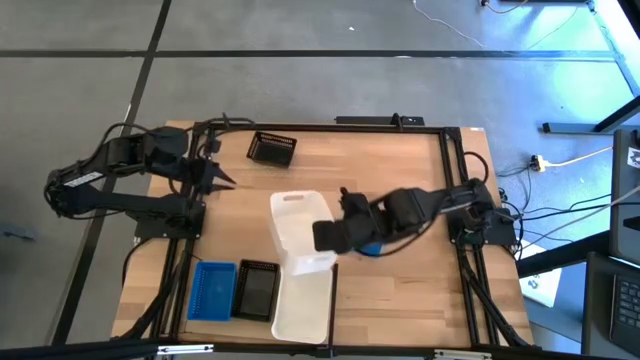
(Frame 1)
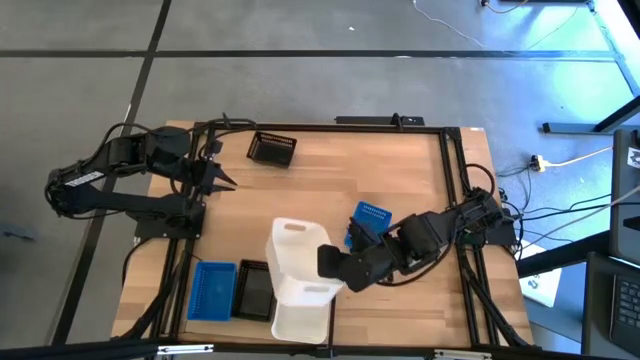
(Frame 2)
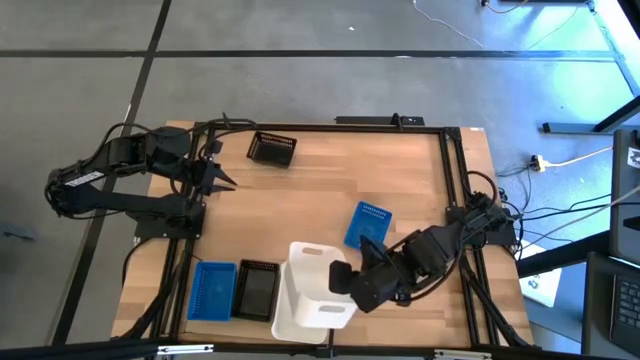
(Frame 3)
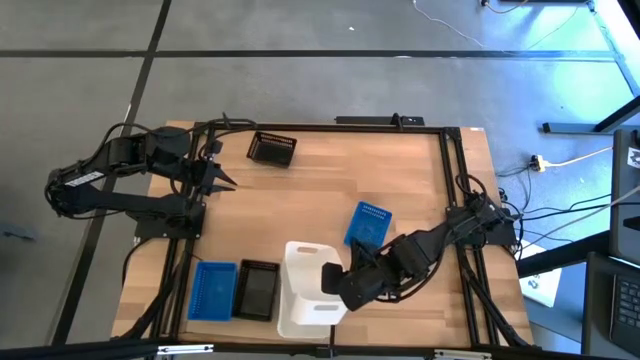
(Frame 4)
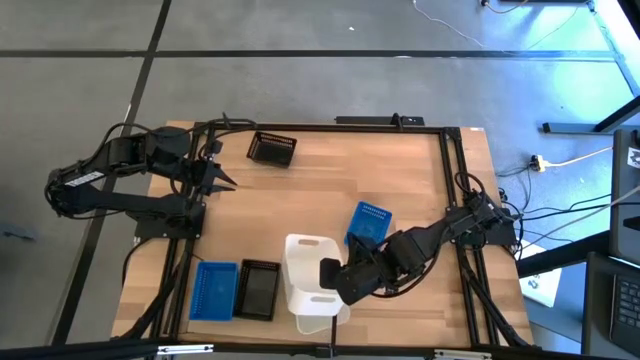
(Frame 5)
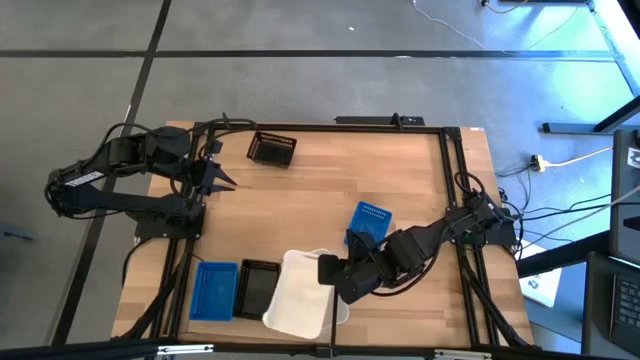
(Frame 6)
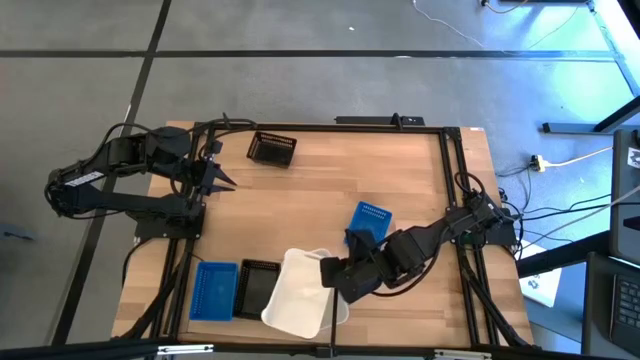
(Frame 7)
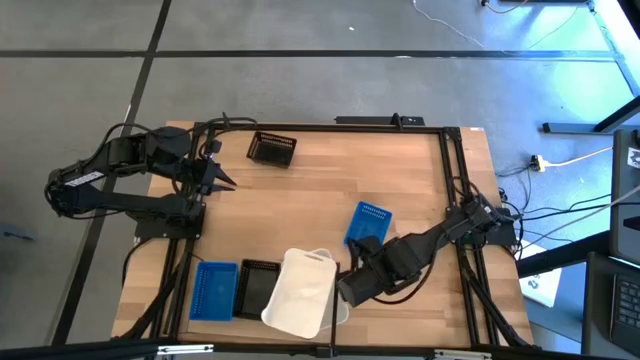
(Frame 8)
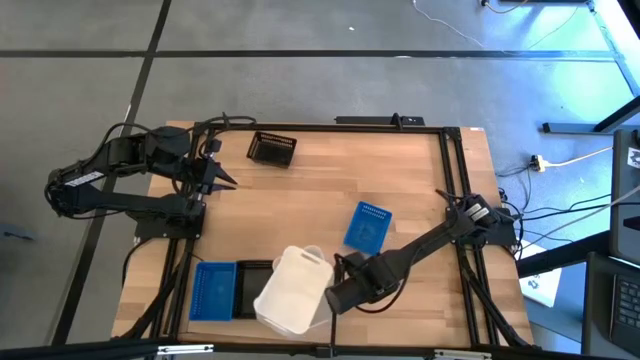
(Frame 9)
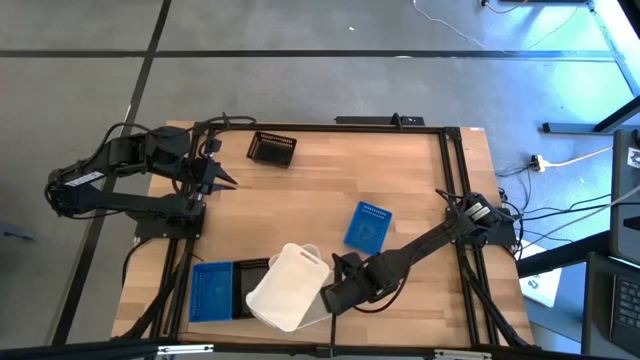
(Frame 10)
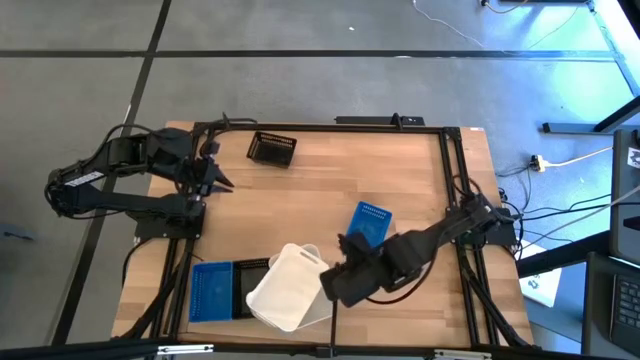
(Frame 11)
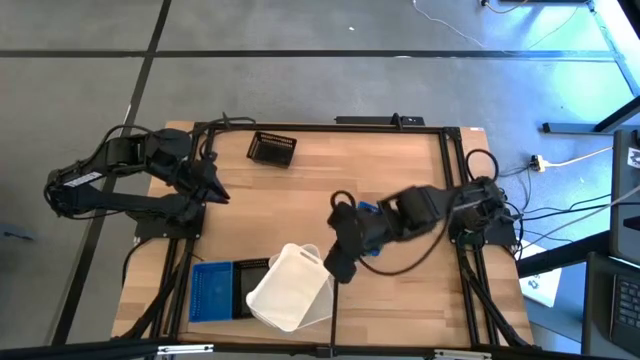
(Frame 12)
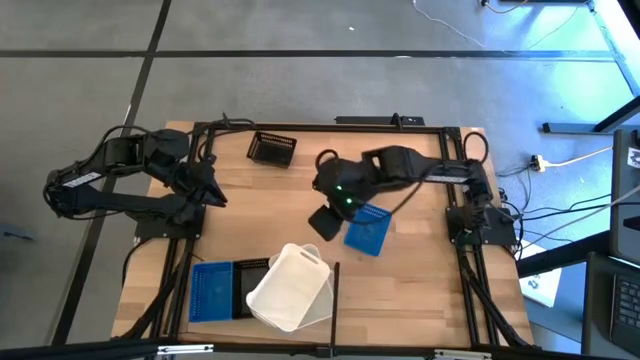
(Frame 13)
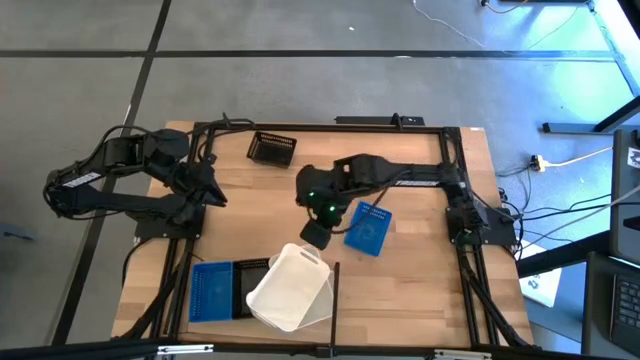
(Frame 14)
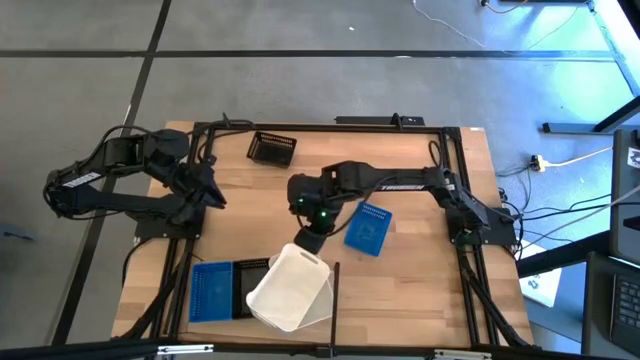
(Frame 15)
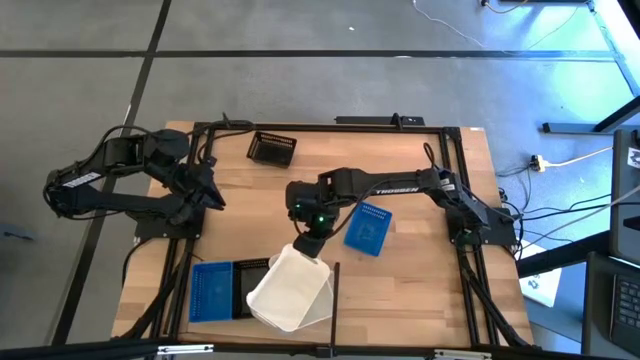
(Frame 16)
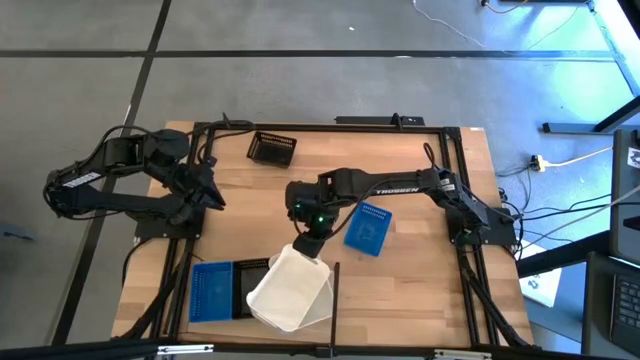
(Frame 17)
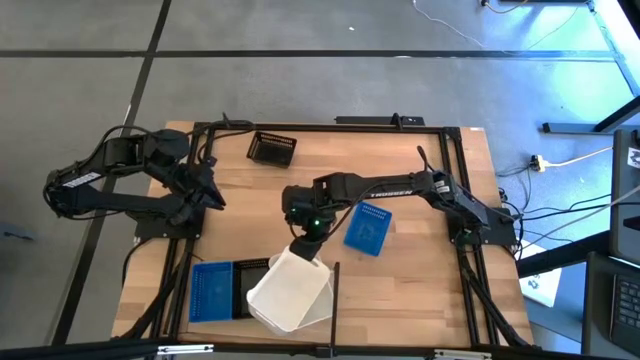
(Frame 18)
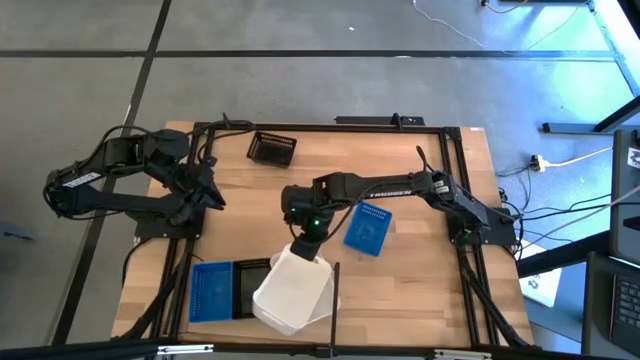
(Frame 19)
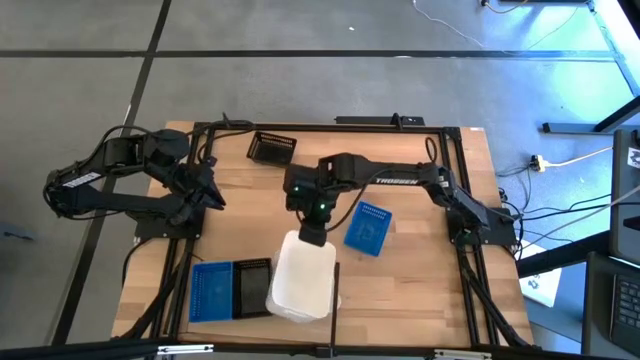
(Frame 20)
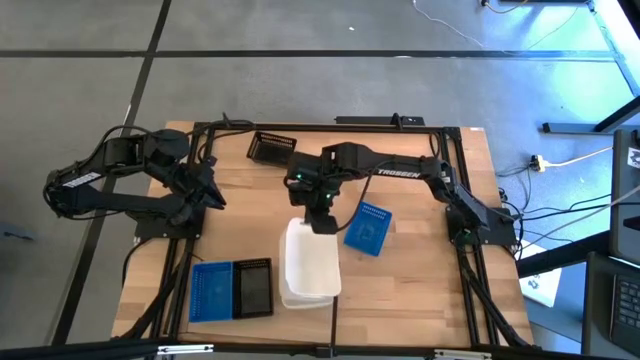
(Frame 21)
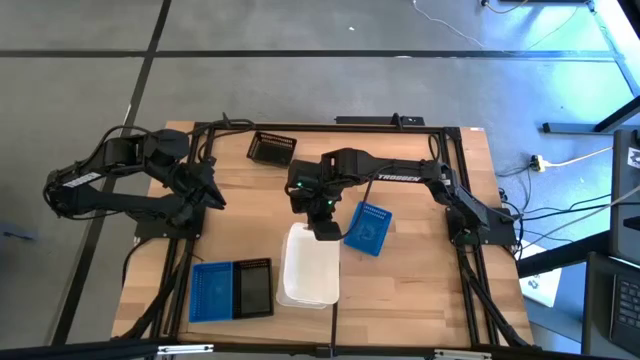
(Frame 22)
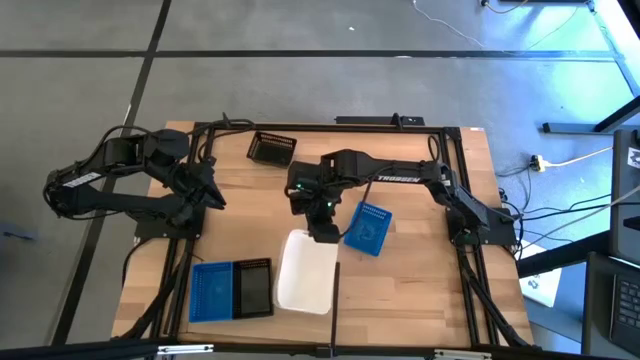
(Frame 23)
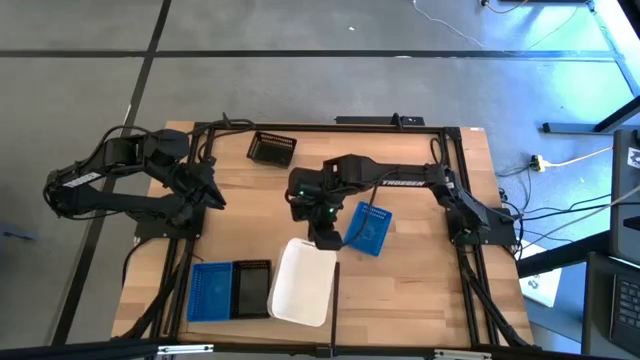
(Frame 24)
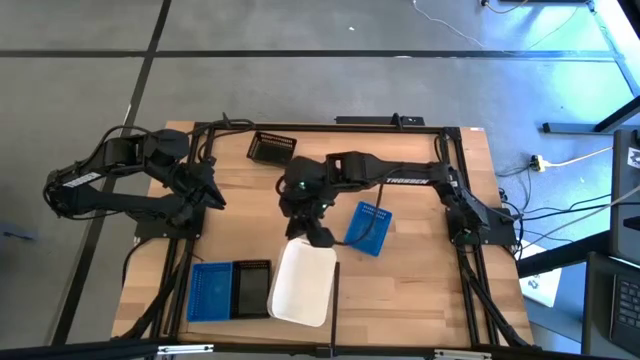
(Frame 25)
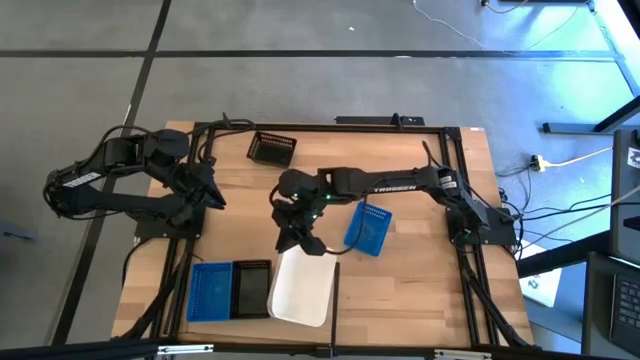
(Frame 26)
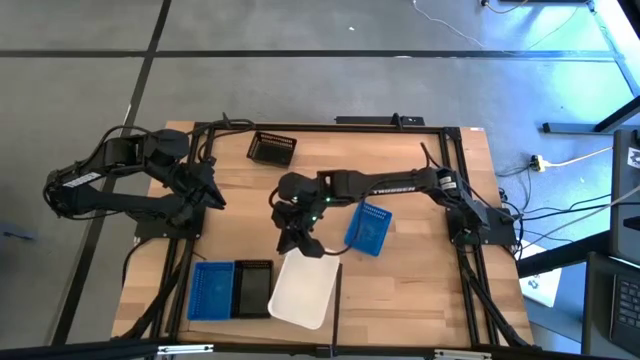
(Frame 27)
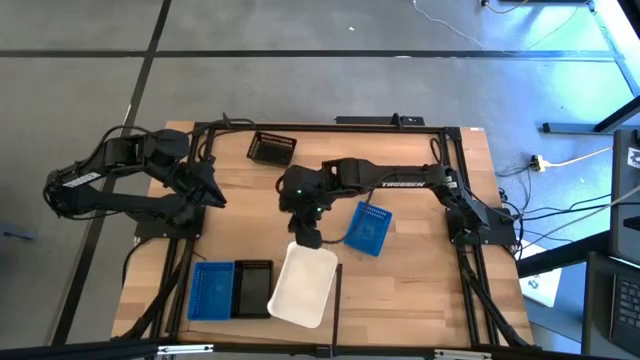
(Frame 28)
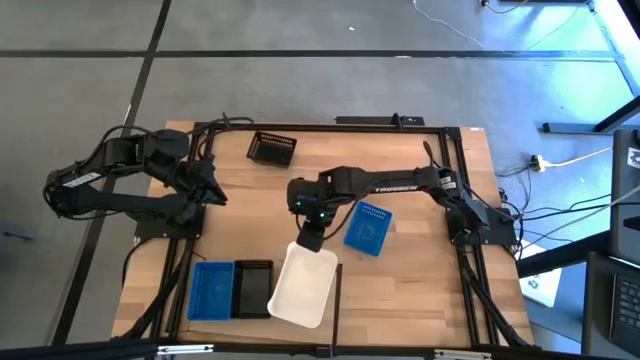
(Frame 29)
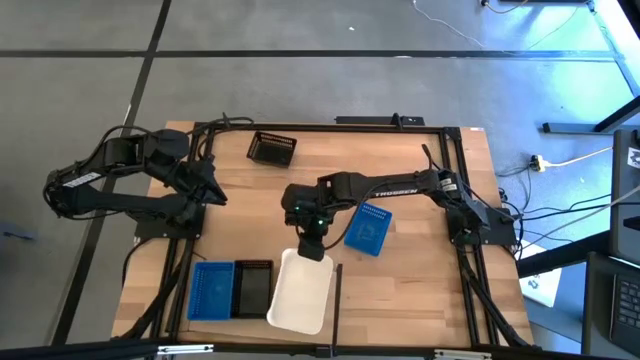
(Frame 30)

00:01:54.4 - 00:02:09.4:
Task: Stack baskets on shelf by color
Stack the white bin on top of the white bins on the shelf

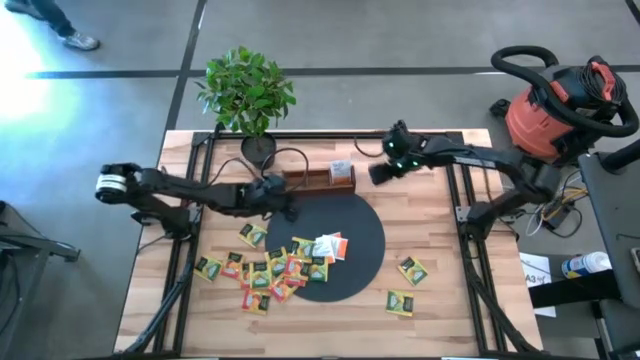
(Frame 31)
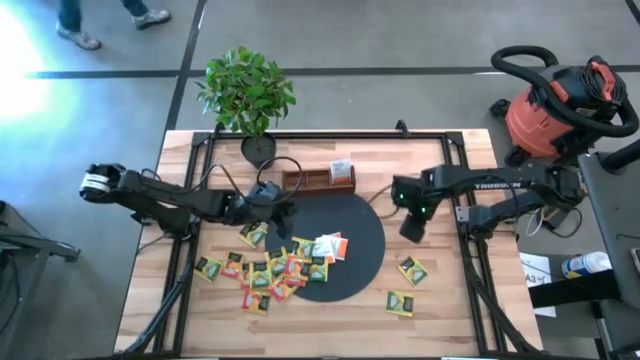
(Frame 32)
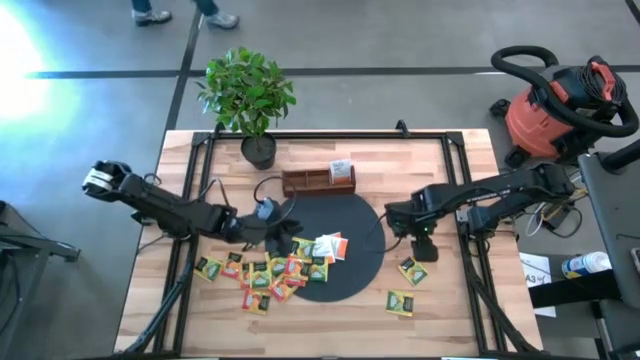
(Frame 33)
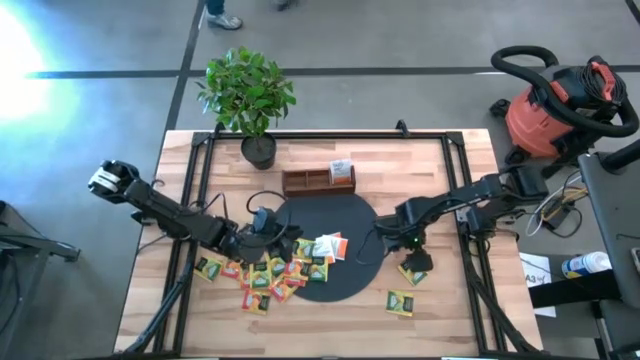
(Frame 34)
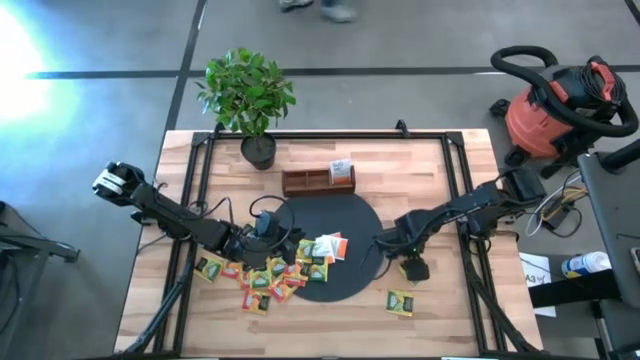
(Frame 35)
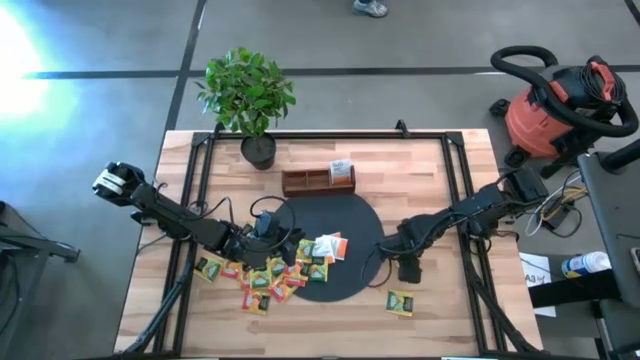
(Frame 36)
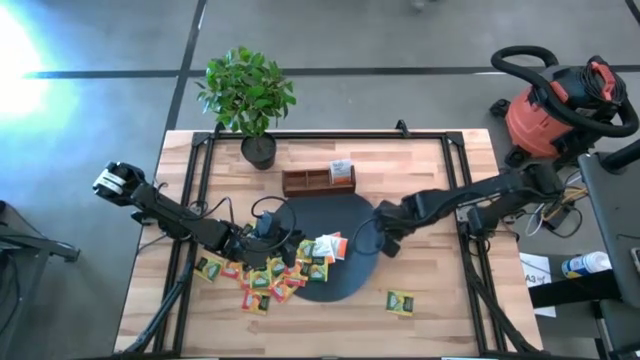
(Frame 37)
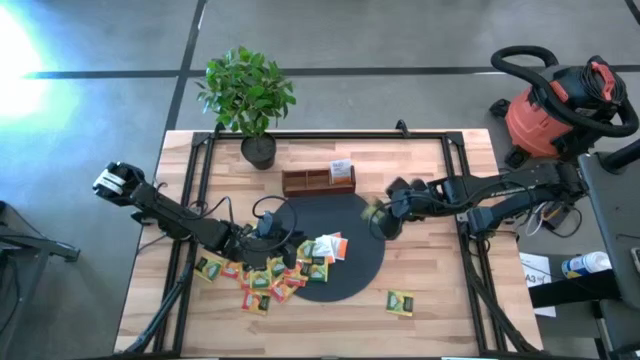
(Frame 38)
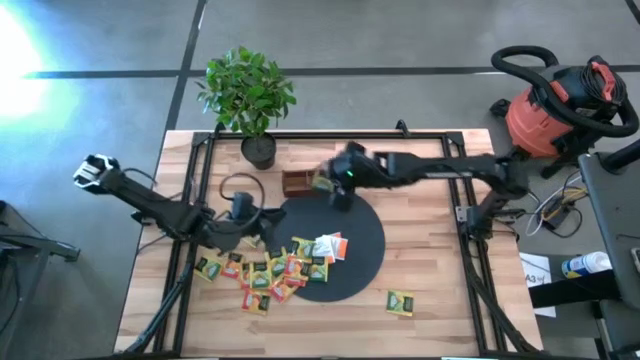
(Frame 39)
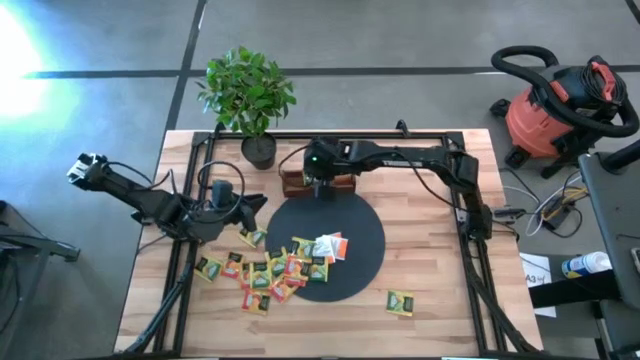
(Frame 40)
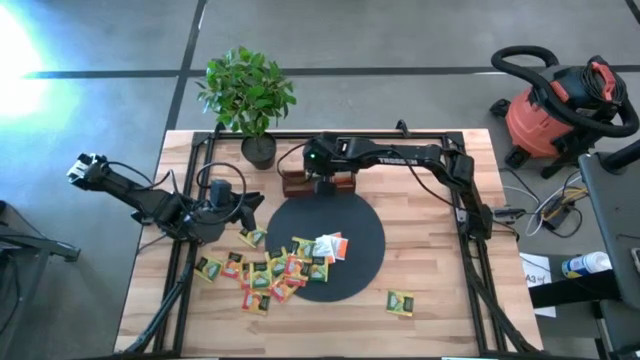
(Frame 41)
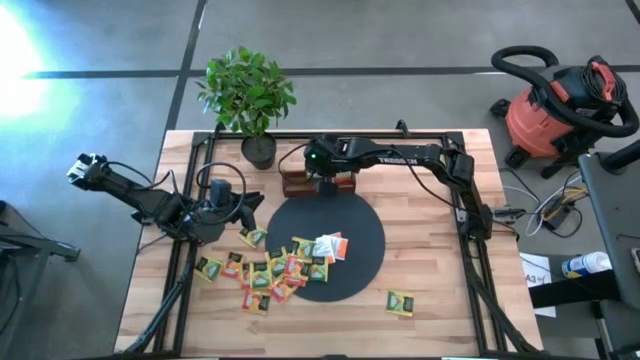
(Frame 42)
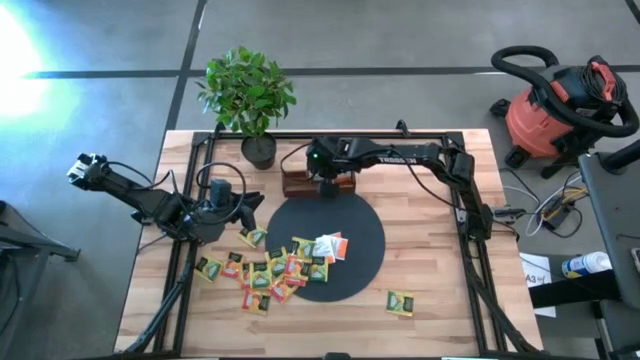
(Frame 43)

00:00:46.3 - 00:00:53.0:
Task: Pick & Place Tea
Put the yellow tea bag into the middle slot of the wooden organizer
